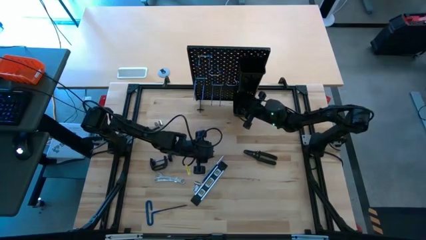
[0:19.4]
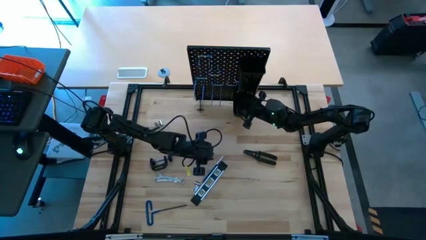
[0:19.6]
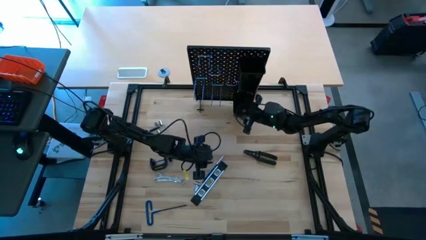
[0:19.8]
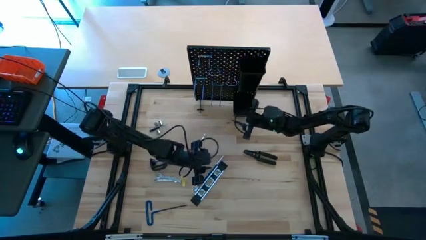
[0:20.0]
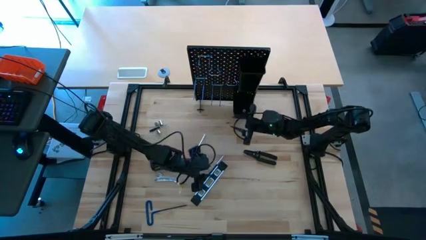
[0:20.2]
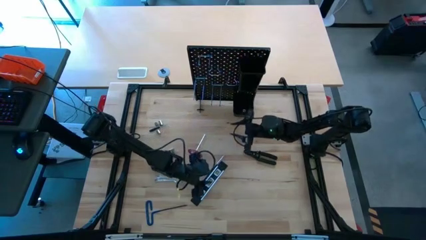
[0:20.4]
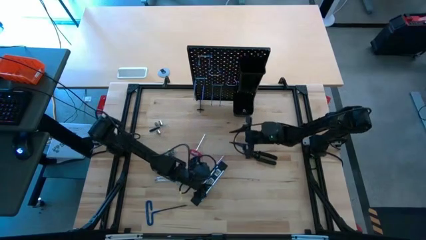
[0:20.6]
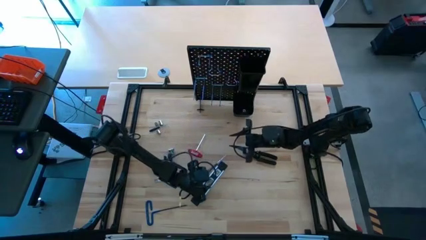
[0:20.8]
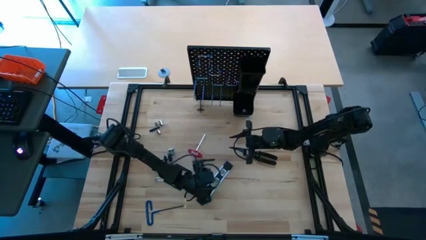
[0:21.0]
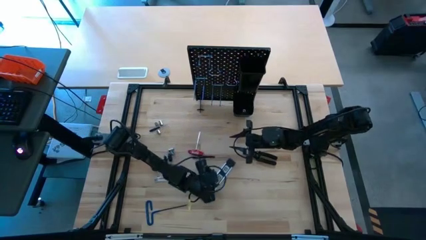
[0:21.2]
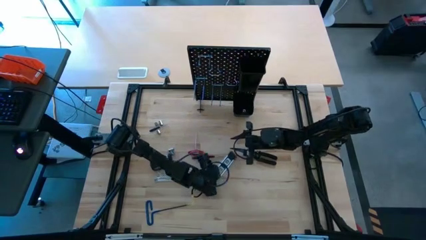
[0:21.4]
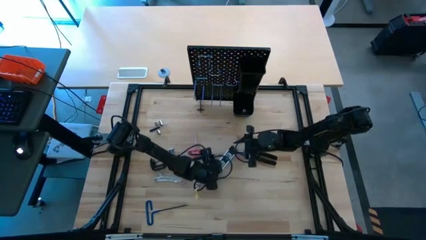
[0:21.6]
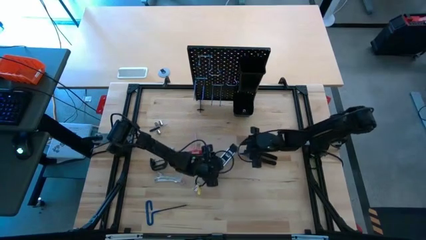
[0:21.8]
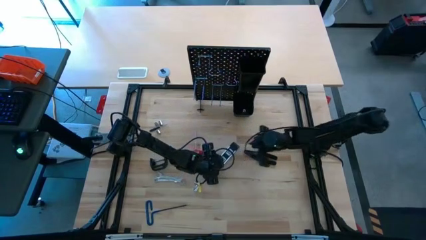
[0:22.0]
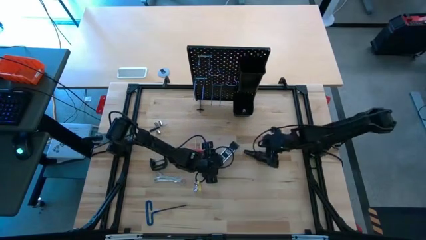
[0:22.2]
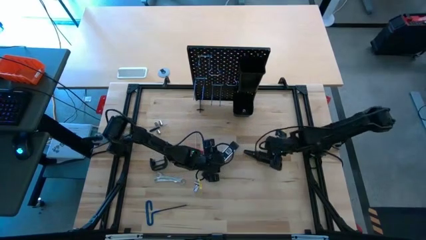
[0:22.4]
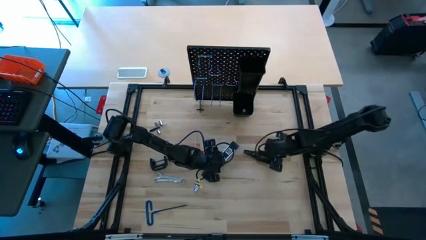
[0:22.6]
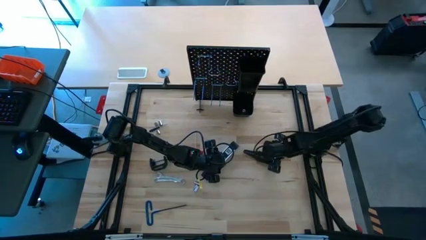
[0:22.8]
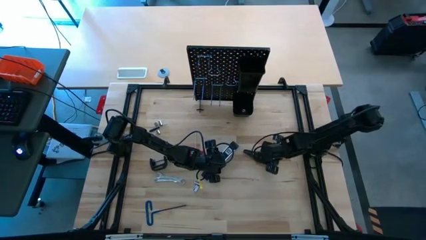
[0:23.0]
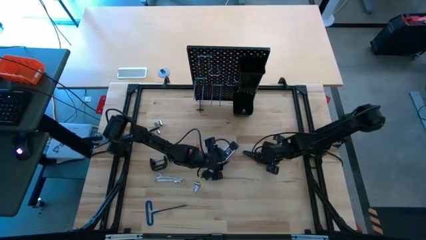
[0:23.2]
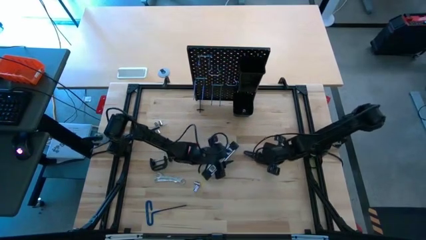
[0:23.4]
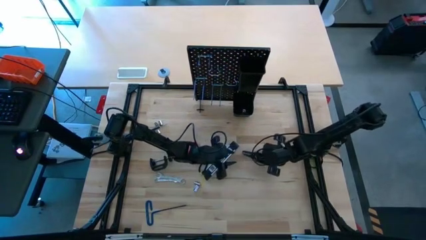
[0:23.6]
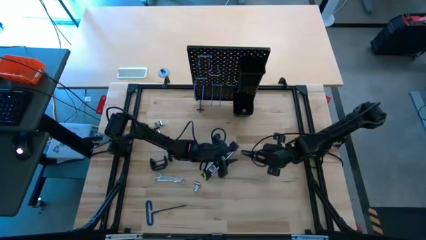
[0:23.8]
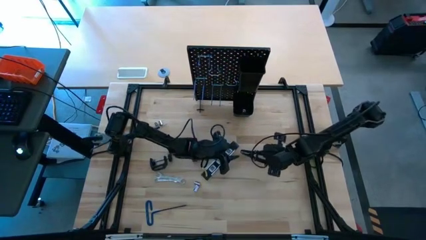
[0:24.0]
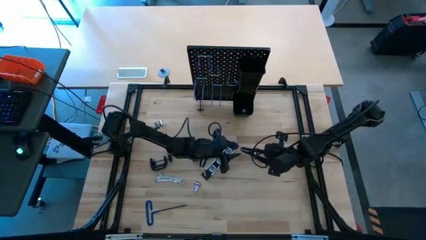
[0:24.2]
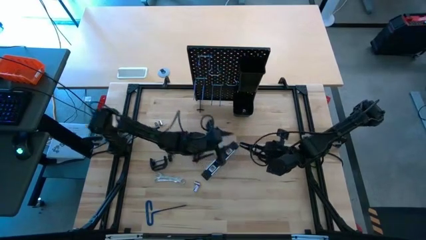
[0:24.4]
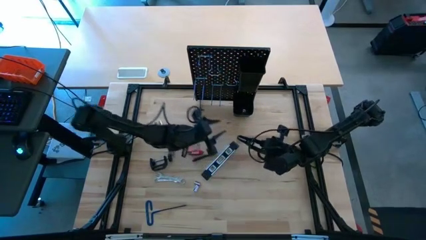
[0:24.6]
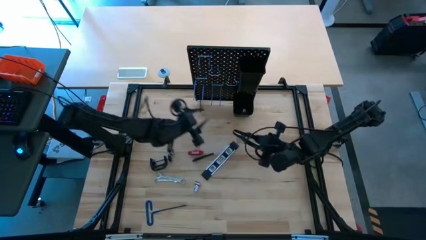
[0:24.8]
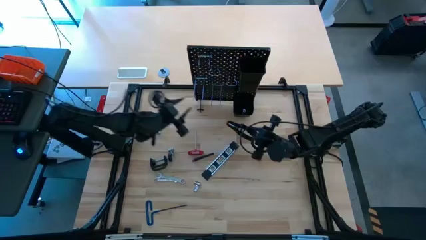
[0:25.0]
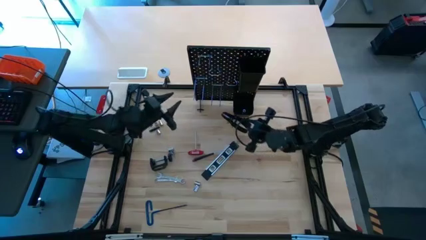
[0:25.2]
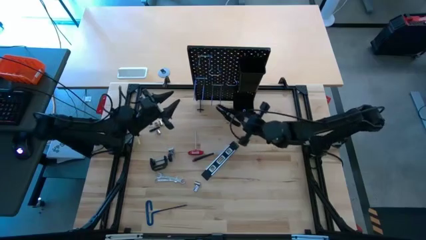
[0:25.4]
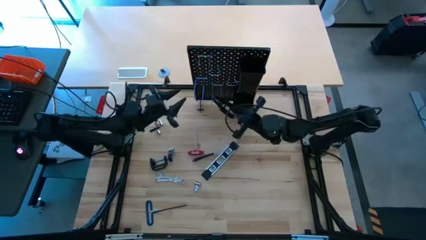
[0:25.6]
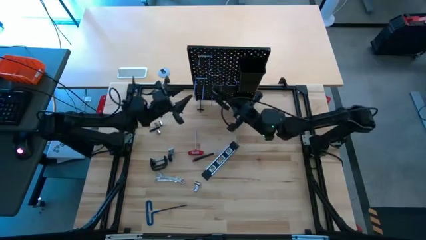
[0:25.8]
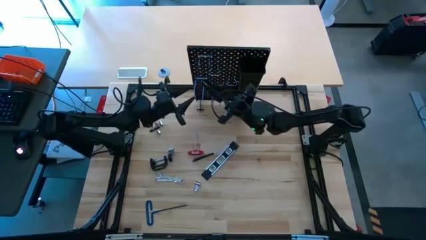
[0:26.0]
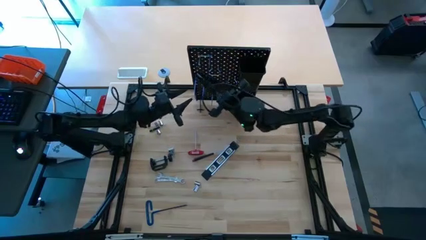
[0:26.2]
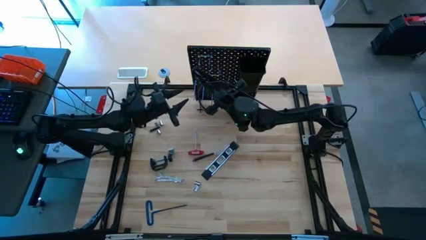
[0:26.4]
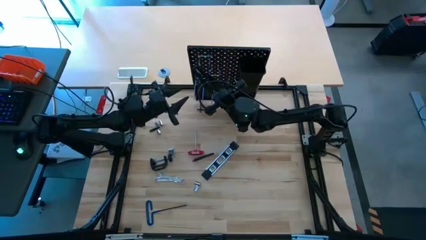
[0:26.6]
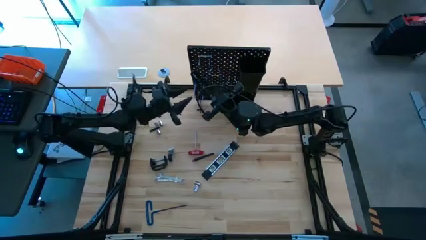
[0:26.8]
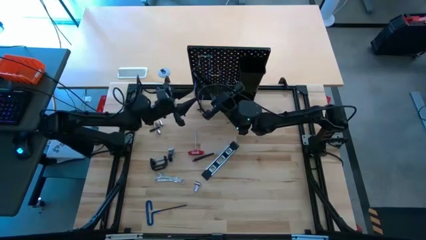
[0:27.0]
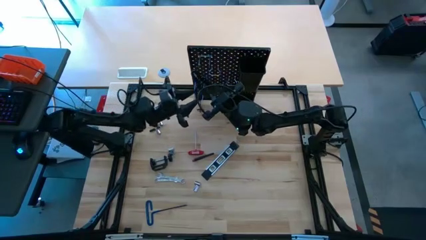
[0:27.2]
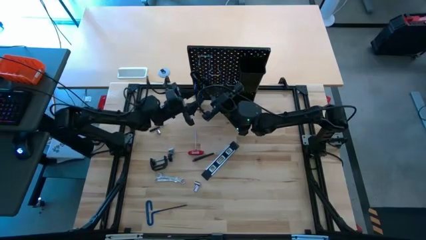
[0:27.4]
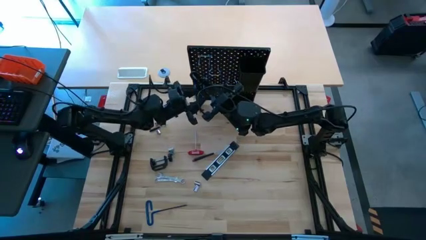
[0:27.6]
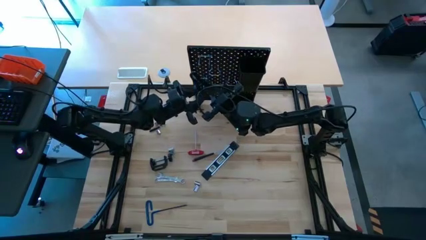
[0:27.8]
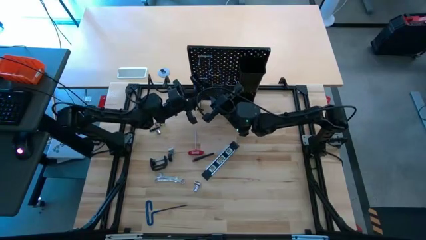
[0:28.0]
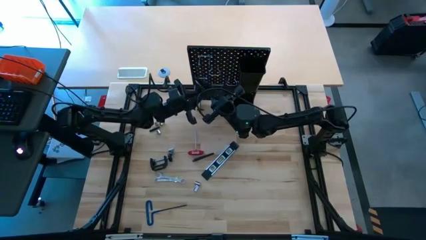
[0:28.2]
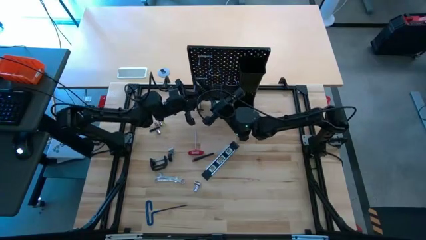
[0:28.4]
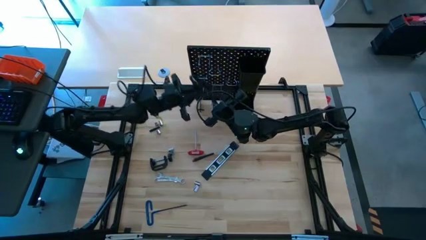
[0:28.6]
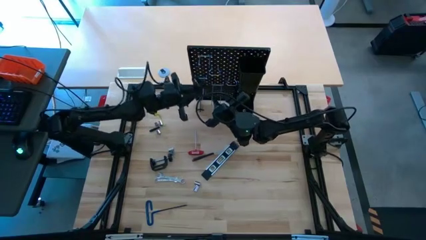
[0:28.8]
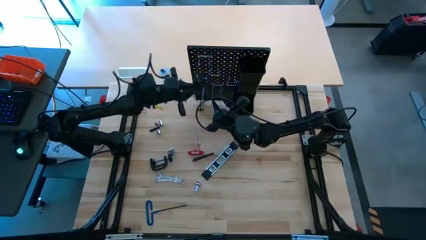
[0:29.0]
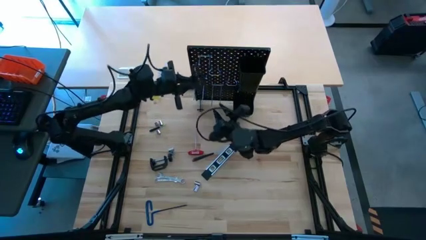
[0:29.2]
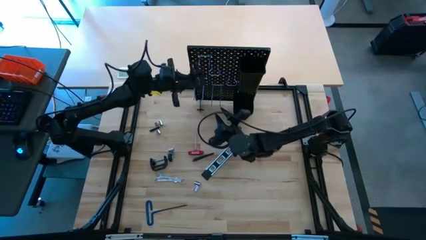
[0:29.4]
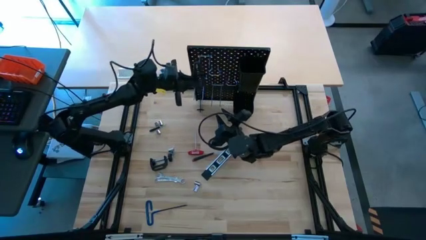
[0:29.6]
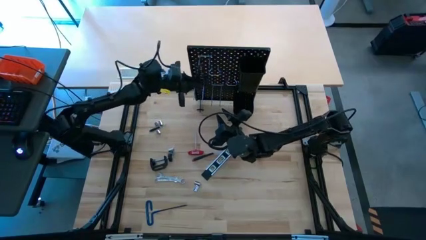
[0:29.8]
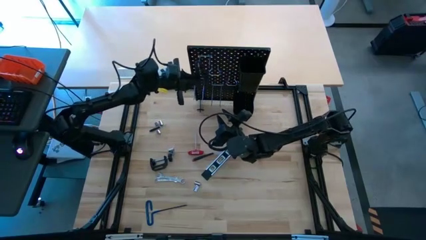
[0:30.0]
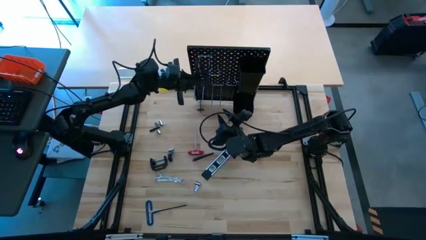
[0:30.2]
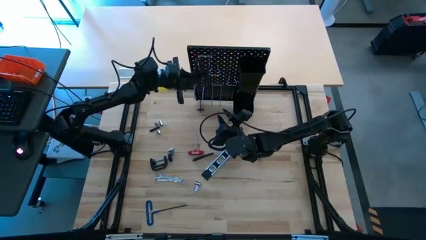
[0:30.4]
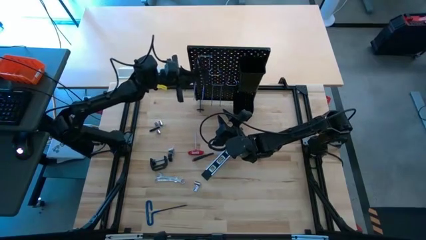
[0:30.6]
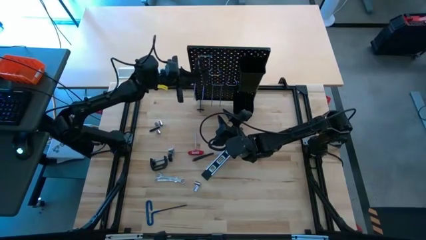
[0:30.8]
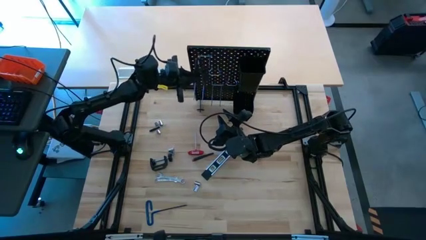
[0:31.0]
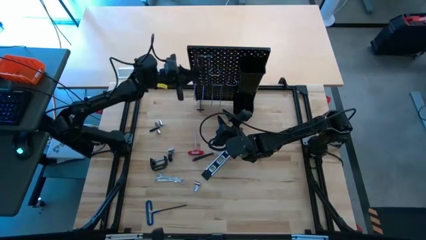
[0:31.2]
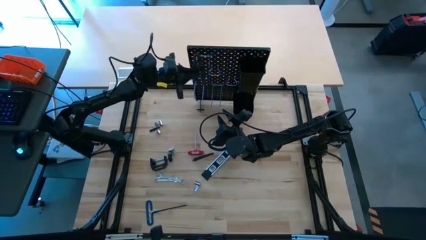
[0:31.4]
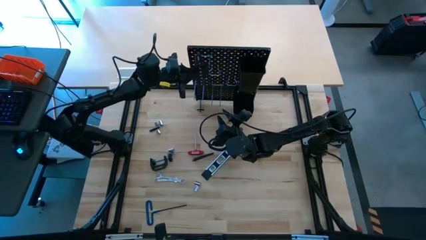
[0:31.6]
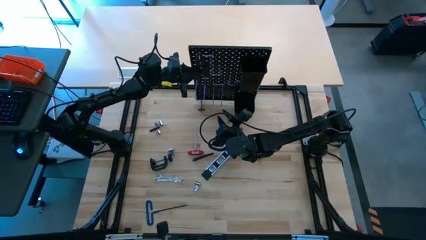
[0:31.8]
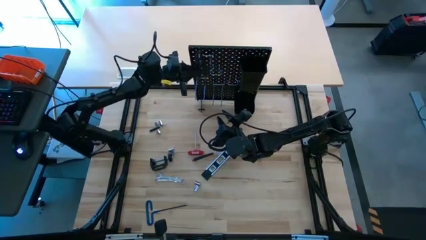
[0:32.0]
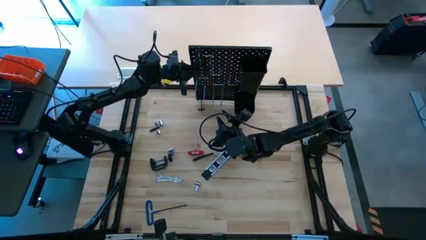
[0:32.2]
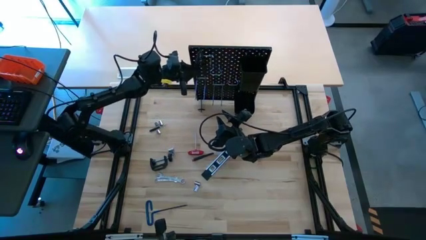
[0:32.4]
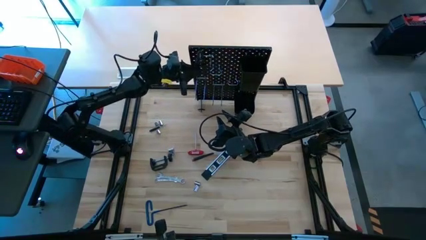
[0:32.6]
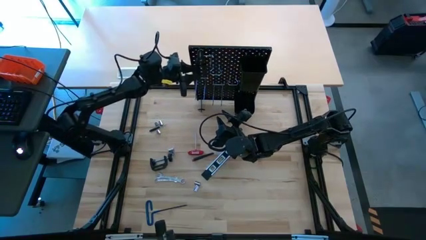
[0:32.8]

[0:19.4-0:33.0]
Task: Hang tools onto peg board
Hang the pliers on the peg board
